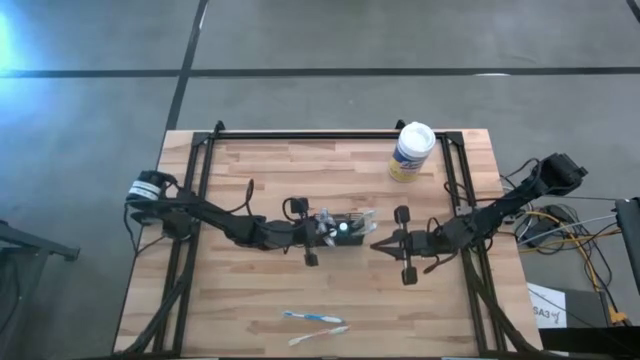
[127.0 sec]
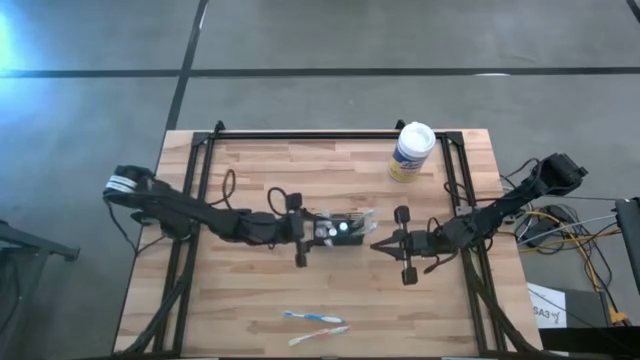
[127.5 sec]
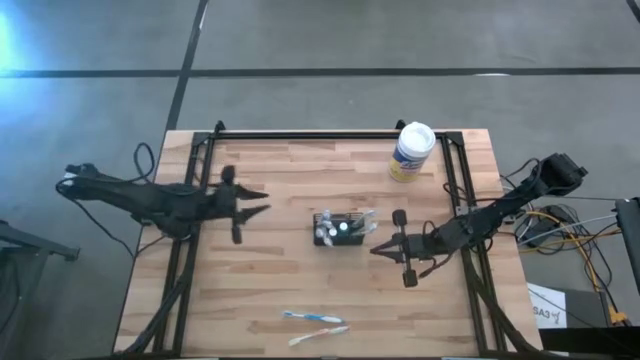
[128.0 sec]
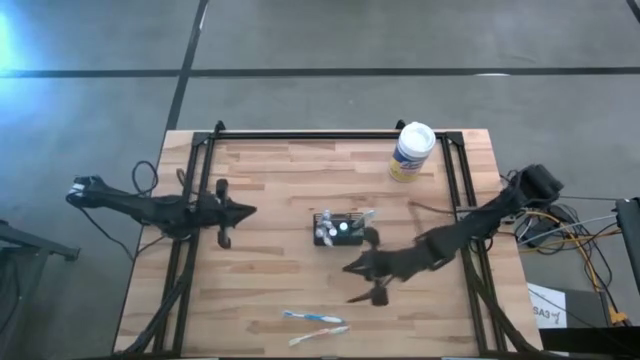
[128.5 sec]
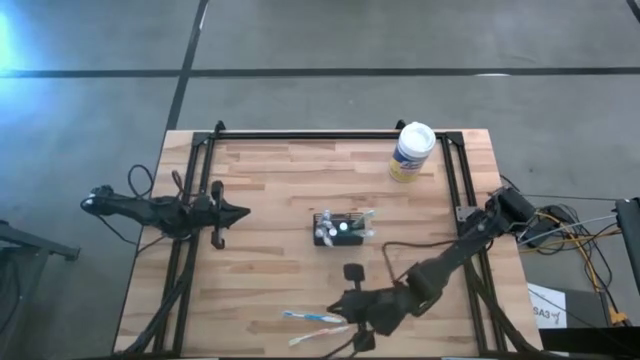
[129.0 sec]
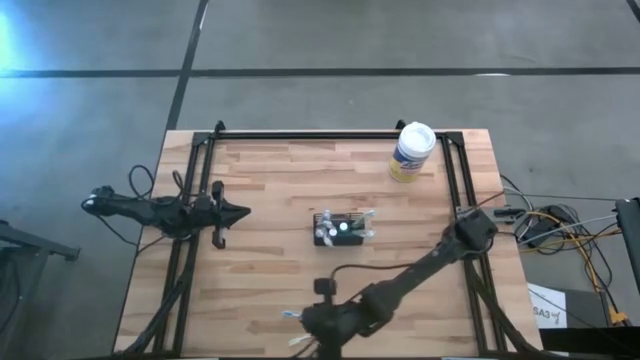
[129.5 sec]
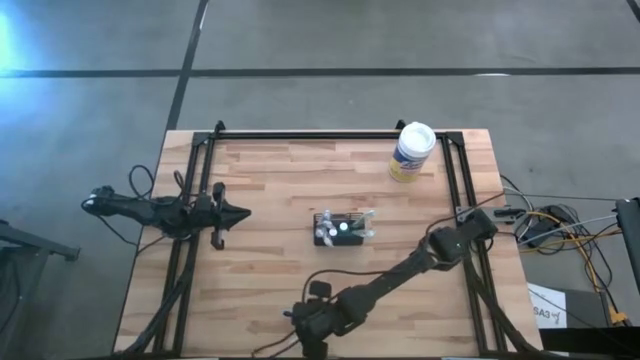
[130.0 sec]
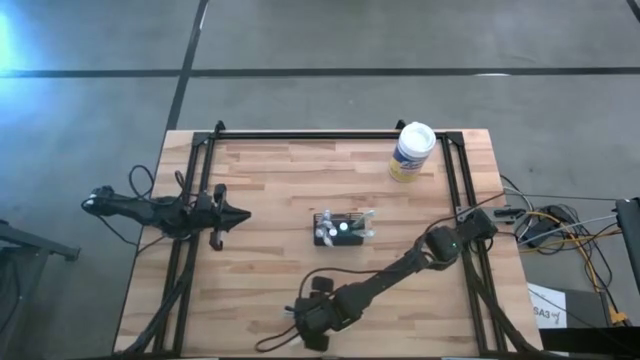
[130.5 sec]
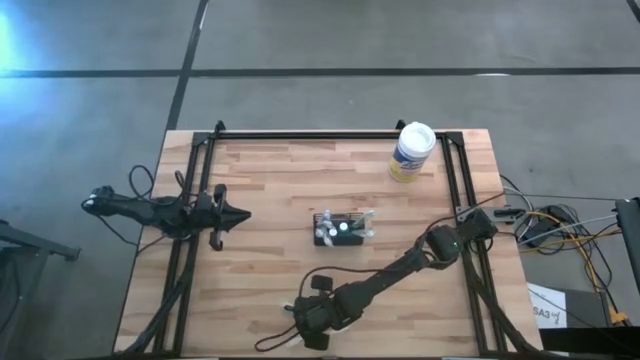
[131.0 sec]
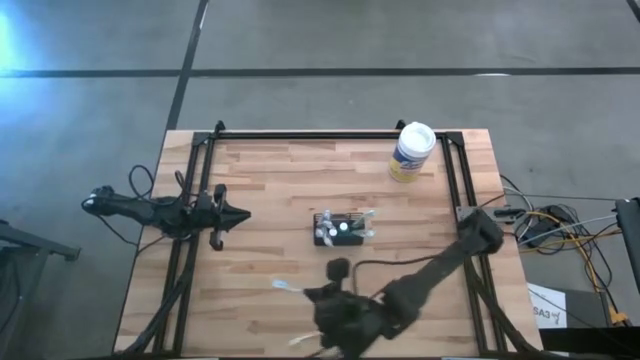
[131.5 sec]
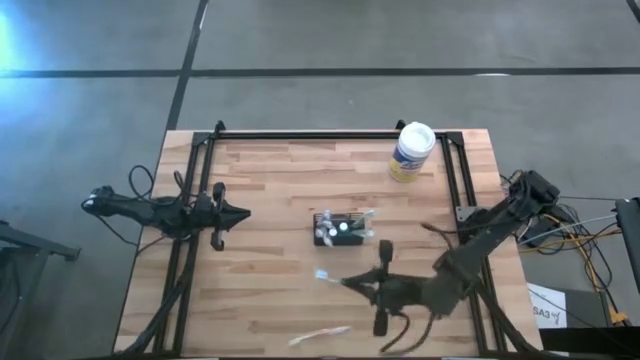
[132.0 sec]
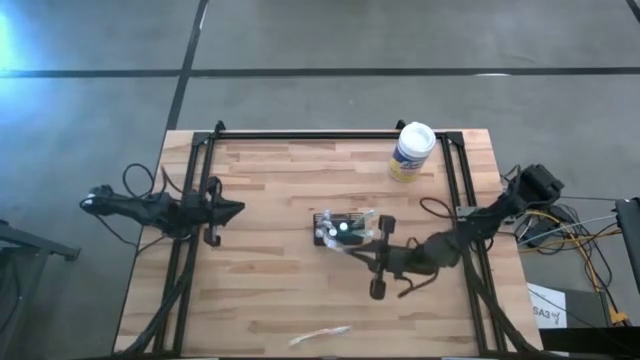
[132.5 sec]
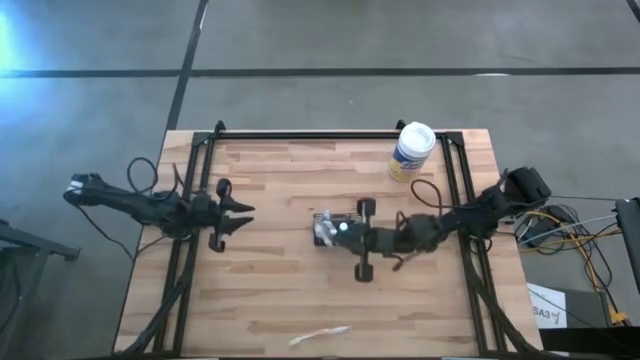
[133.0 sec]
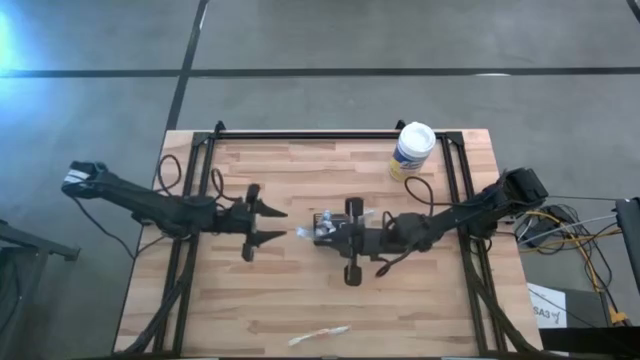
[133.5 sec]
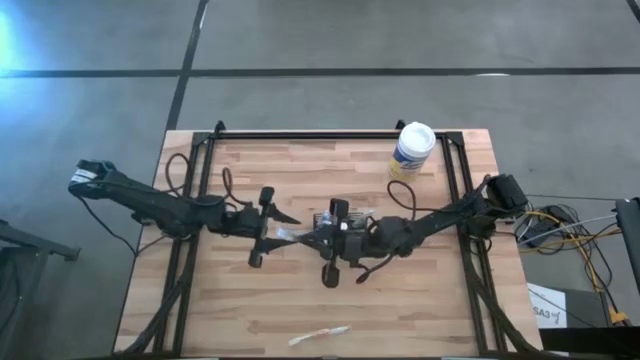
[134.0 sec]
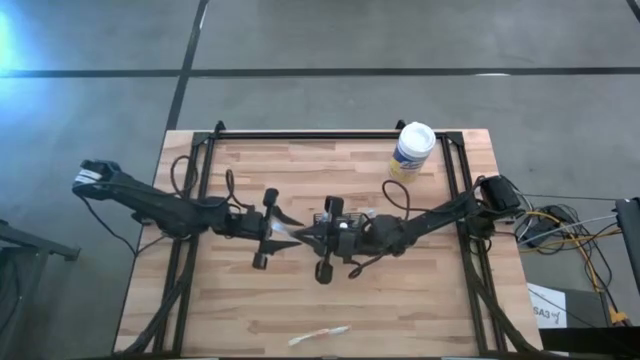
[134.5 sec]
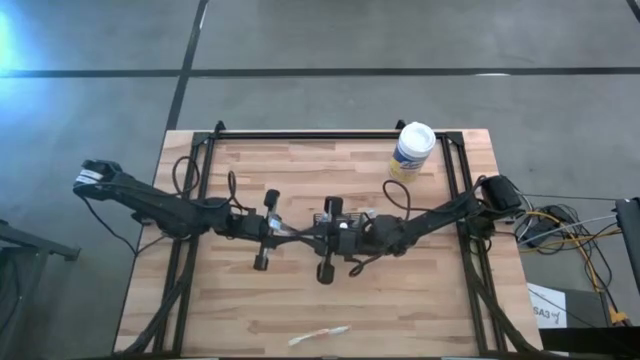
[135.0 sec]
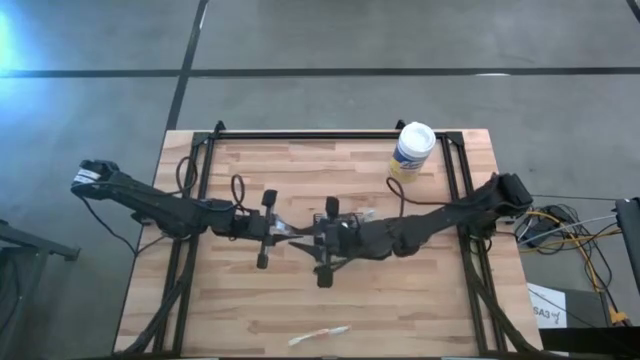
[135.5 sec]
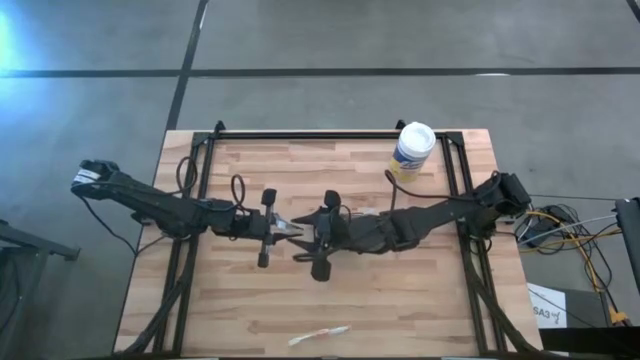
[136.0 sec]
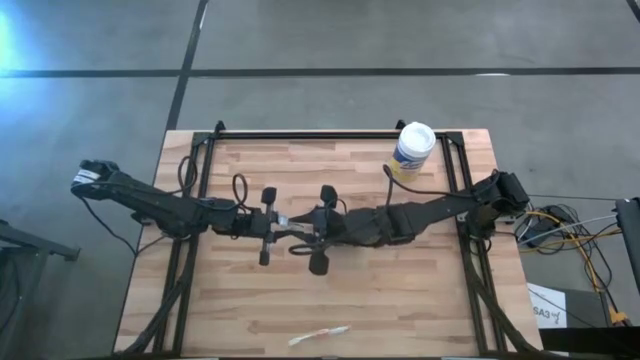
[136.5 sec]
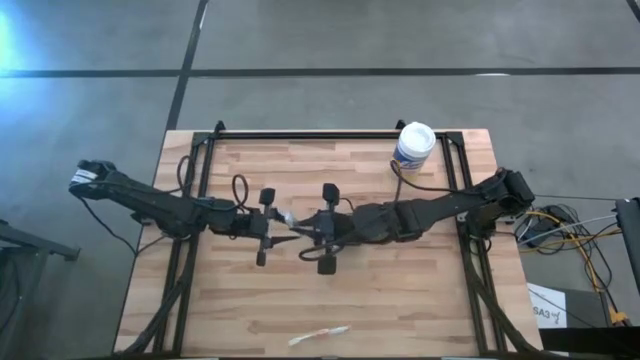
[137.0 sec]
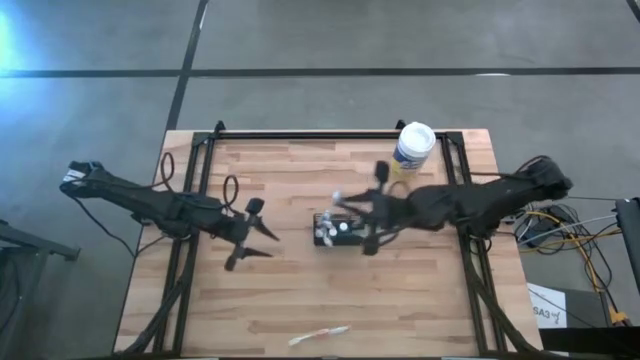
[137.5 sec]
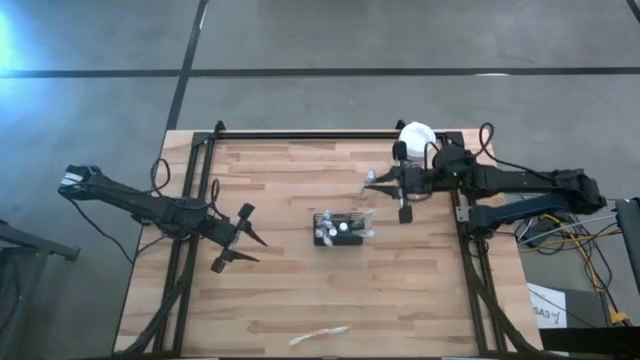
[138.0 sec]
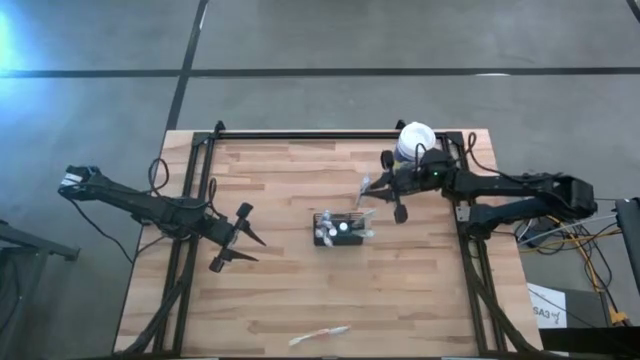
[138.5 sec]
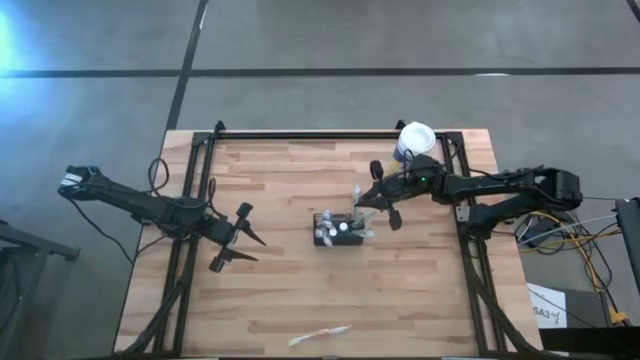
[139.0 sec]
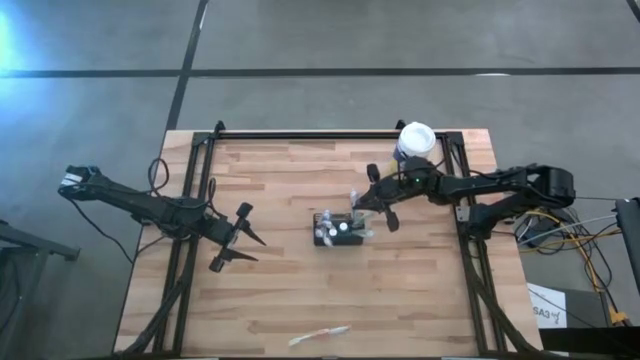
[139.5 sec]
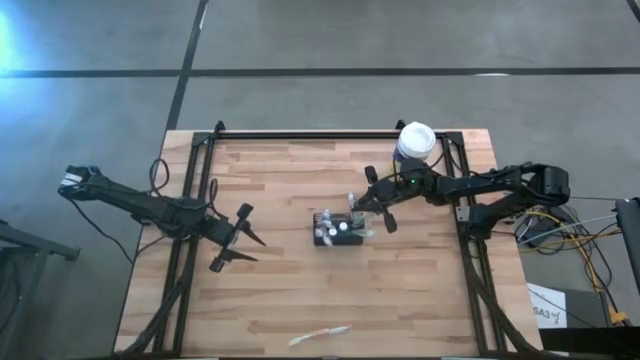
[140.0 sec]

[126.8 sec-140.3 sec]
Task: Pick & Place toothbrushing station
Put the blue toothbrush into the mesh organizer

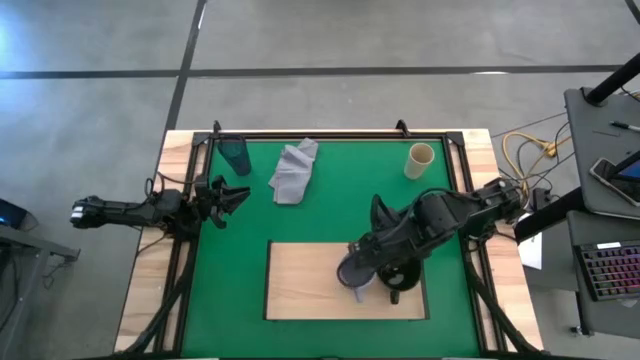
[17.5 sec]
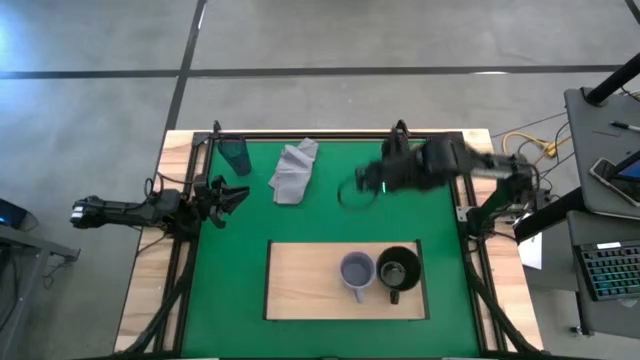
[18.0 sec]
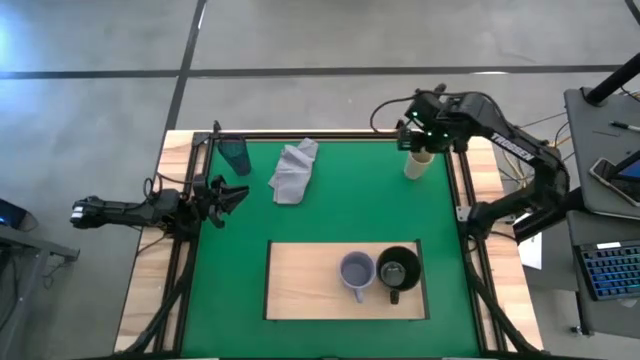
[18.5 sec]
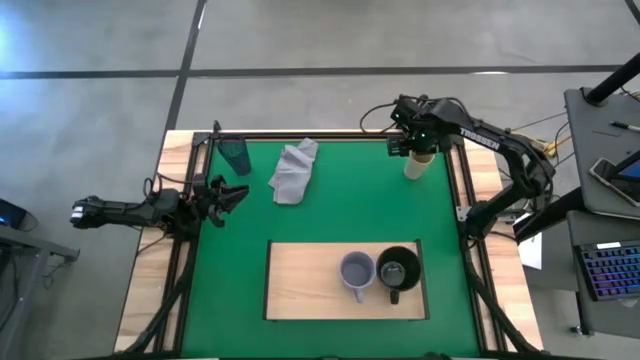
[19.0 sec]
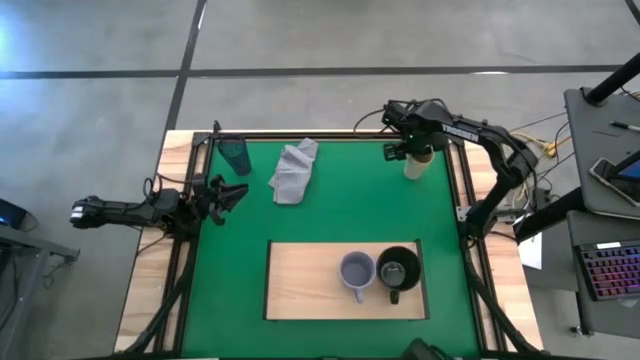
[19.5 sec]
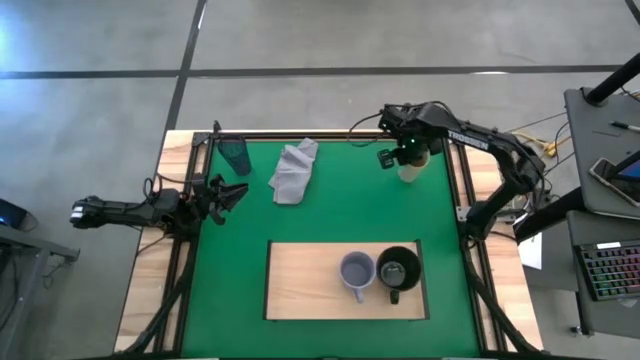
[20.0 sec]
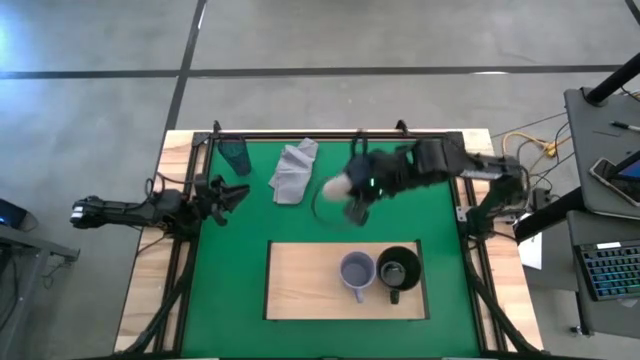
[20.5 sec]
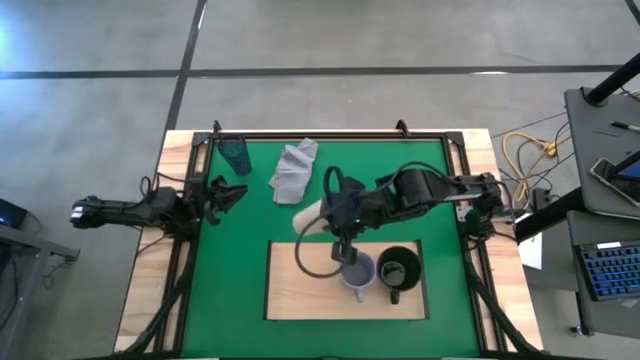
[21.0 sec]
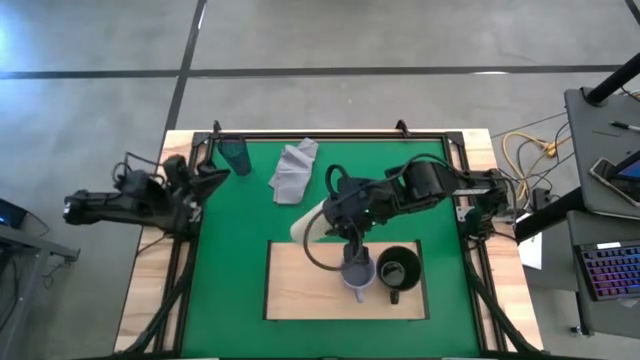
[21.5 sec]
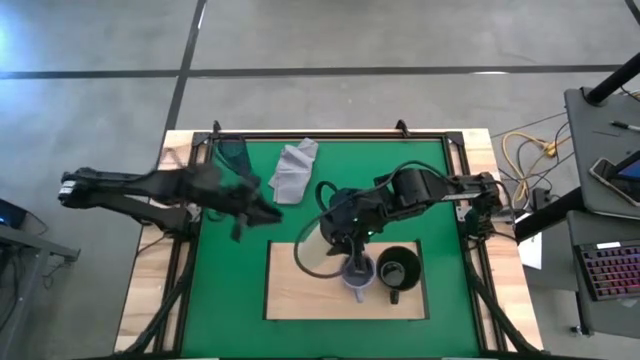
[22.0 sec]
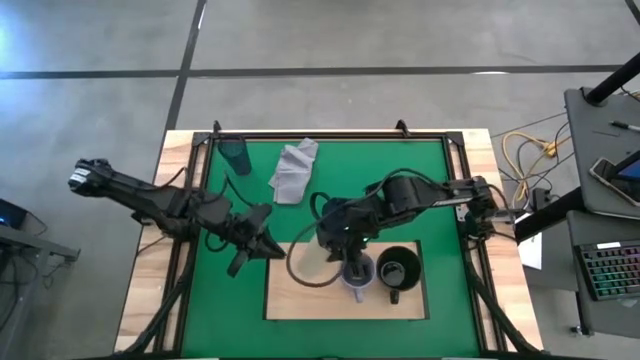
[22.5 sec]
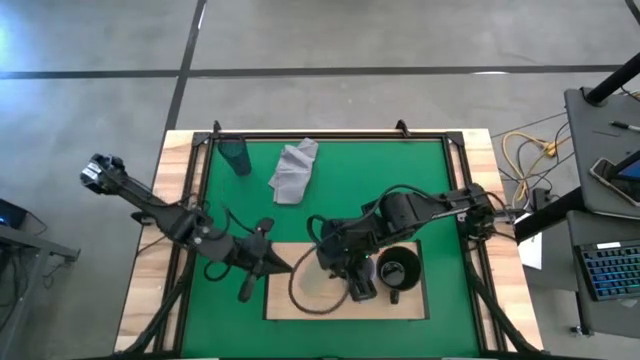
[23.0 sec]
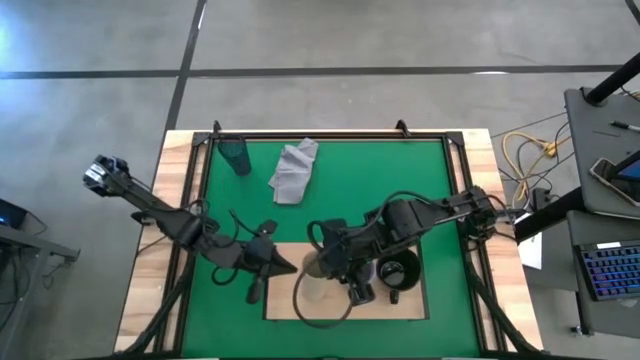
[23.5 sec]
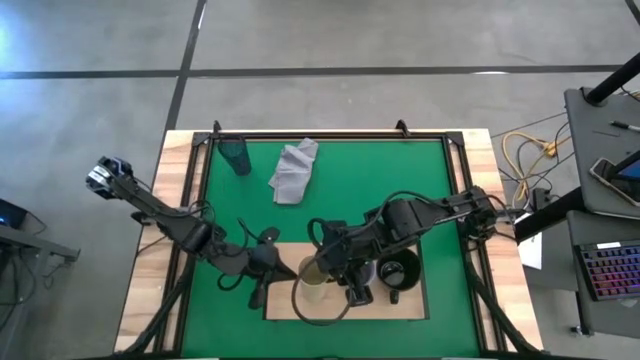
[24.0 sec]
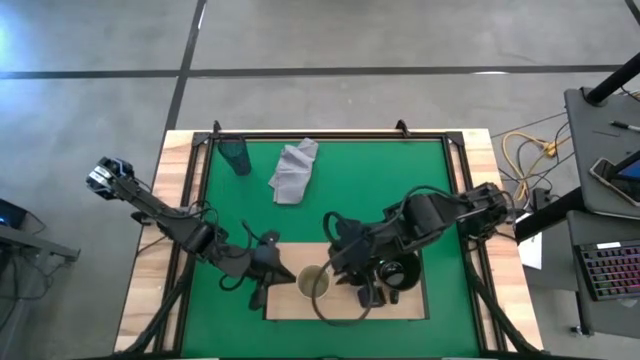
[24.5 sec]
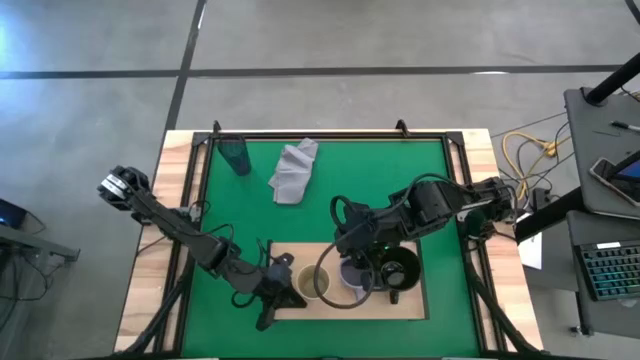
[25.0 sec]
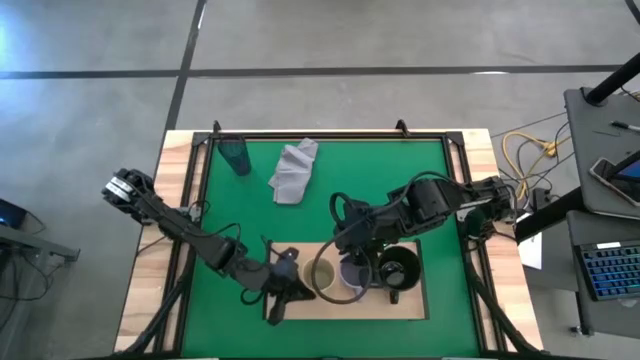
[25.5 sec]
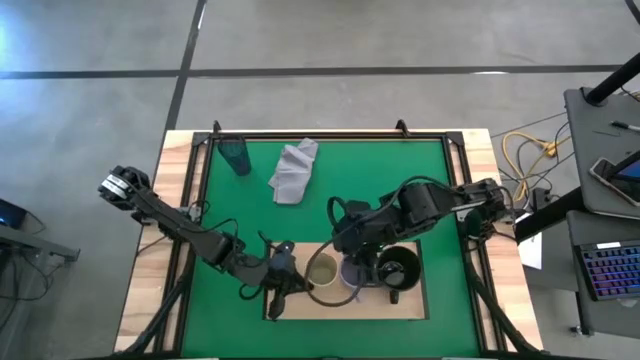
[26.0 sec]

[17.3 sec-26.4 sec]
Task: Stack small to large cups/mugs on shelf
Put the white cup on the shelf
